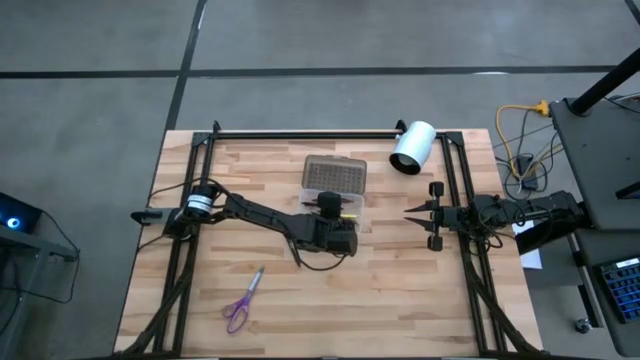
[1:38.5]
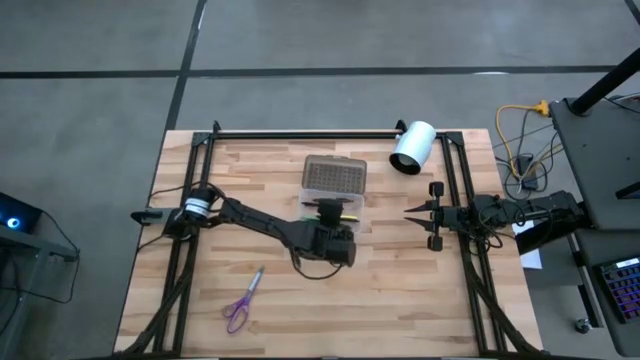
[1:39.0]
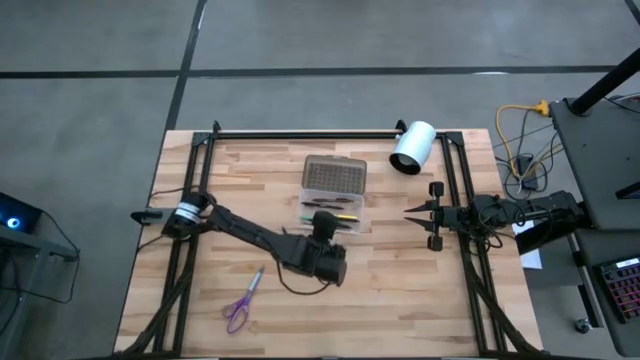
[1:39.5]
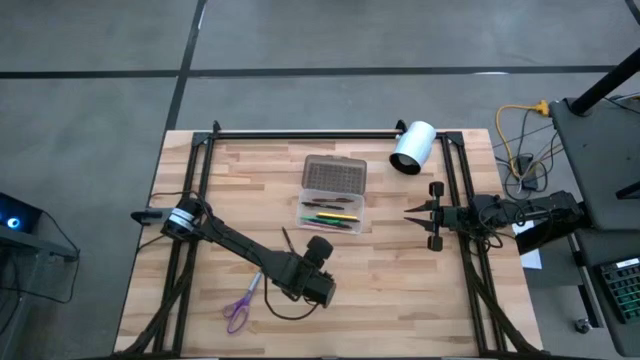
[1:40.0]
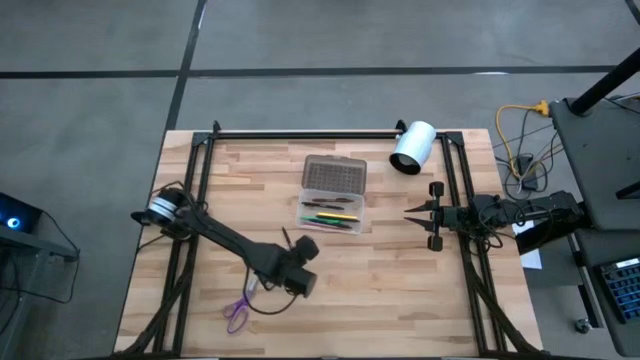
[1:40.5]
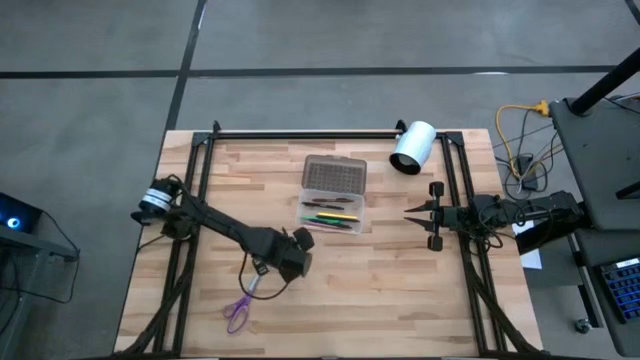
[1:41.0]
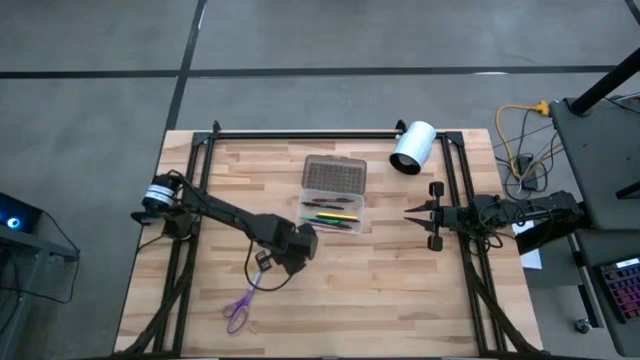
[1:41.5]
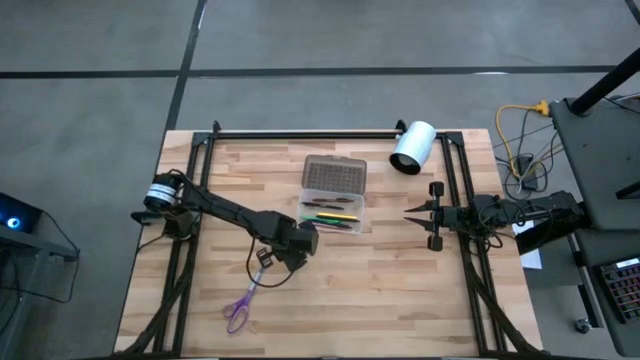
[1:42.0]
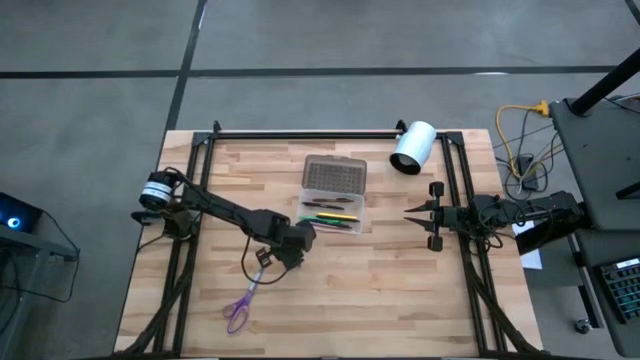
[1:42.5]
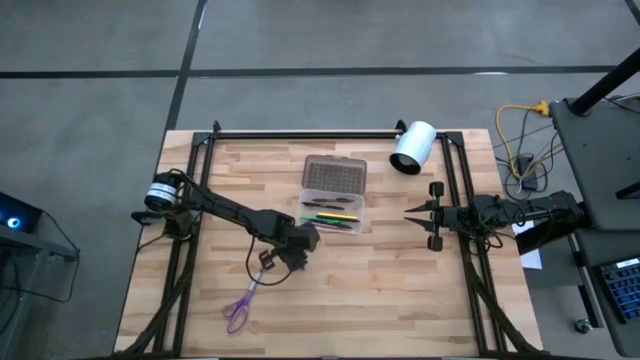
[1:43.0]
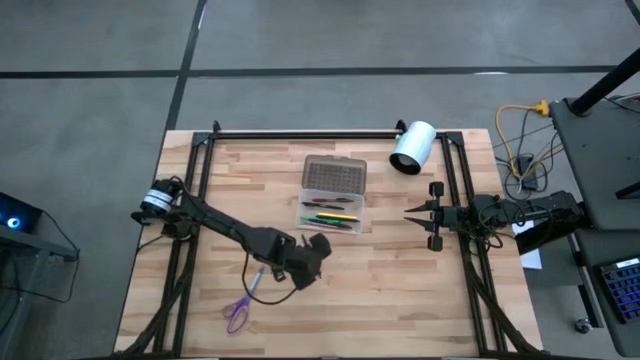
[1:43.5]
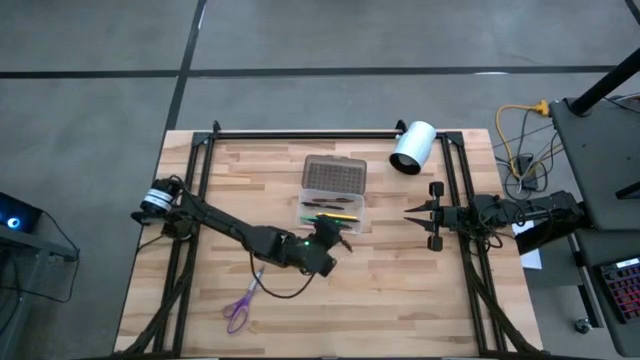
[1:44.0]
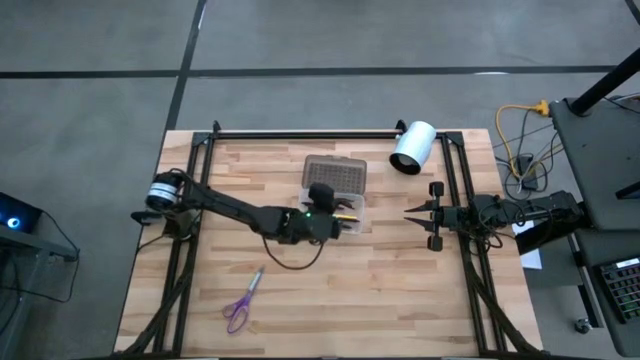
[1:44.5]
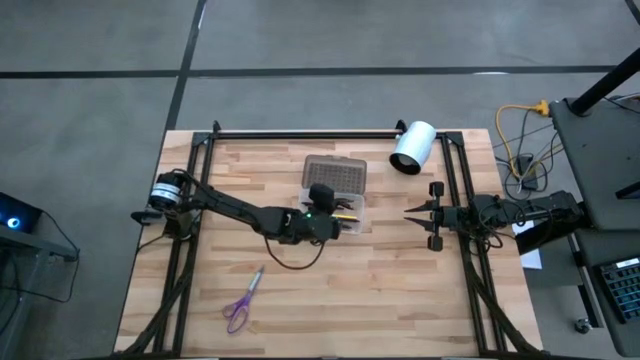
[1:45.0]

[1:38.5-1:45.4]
Task: Pick & place school supplies into a supply box
Put the black pen into the black supply box

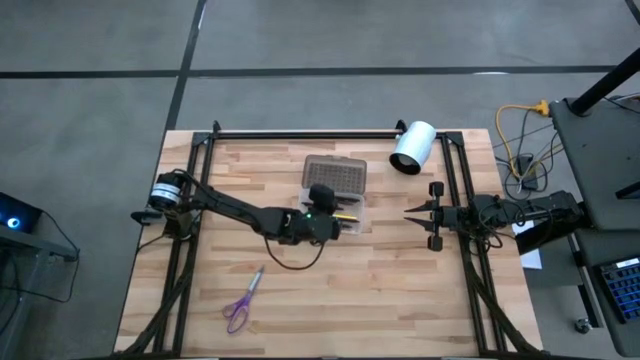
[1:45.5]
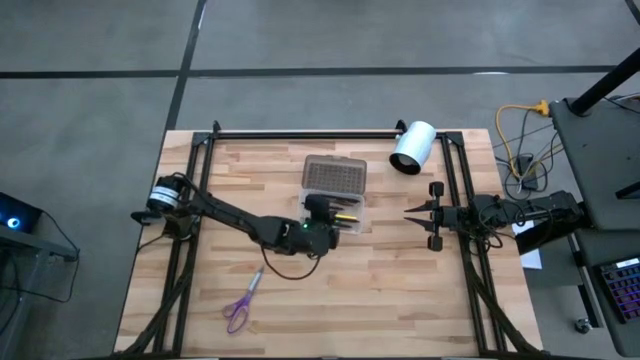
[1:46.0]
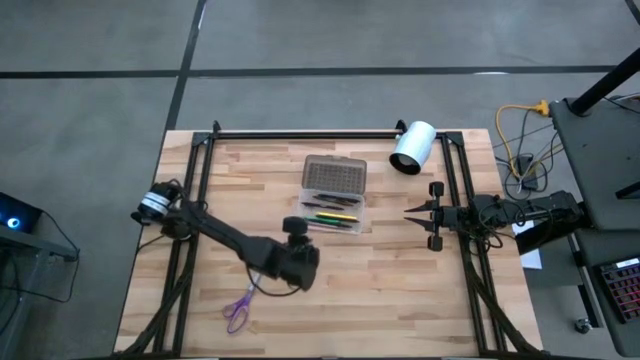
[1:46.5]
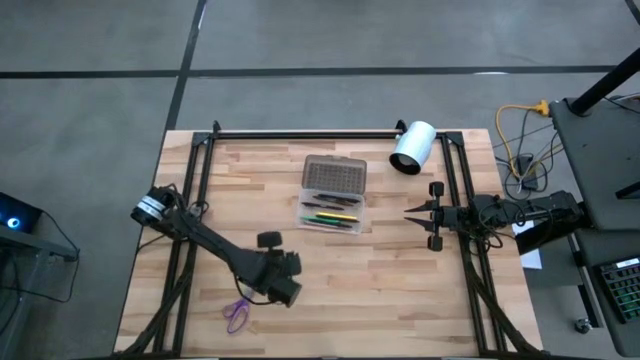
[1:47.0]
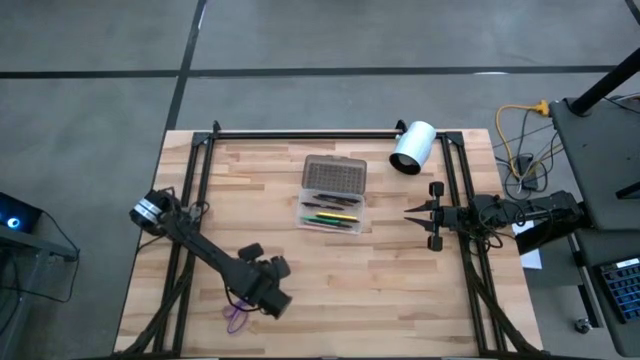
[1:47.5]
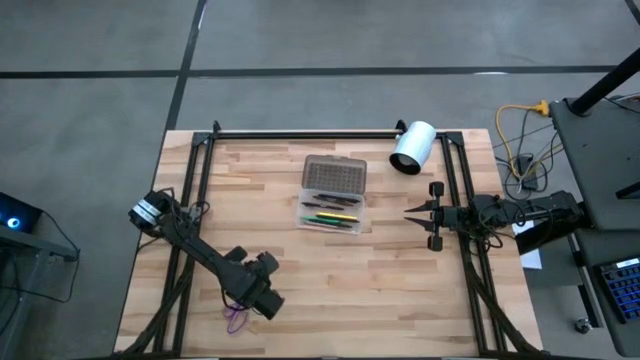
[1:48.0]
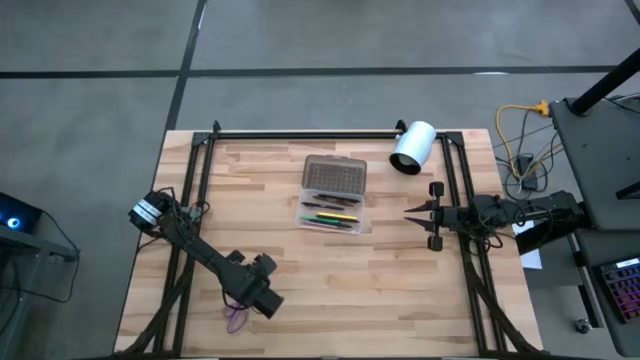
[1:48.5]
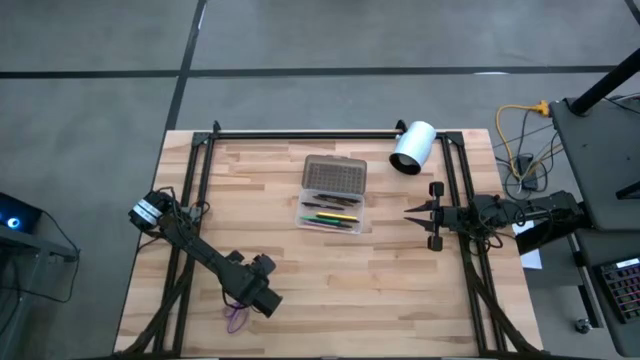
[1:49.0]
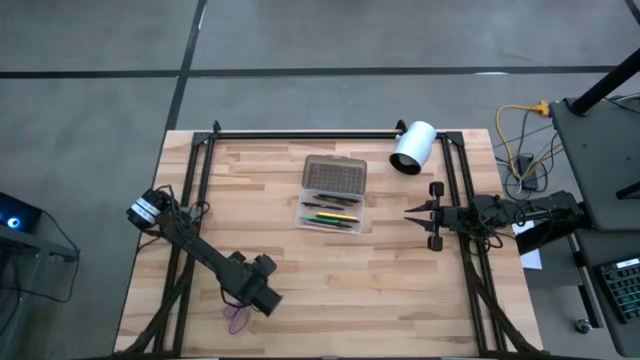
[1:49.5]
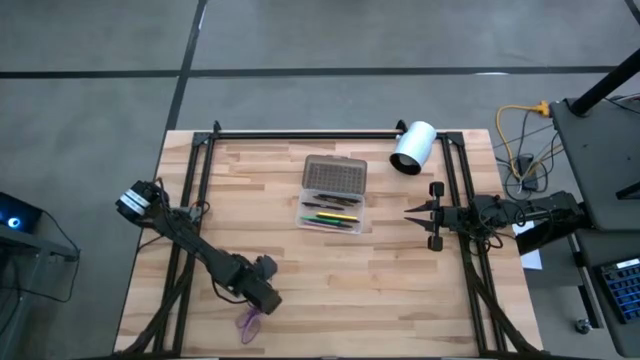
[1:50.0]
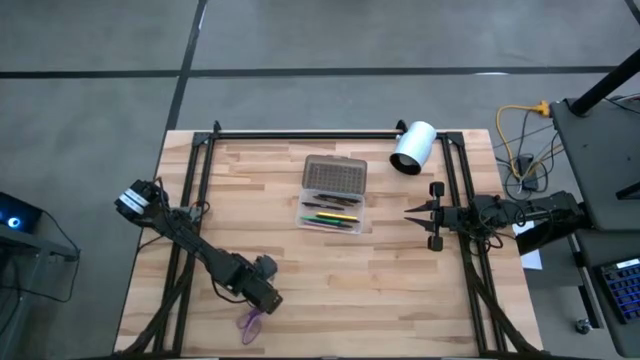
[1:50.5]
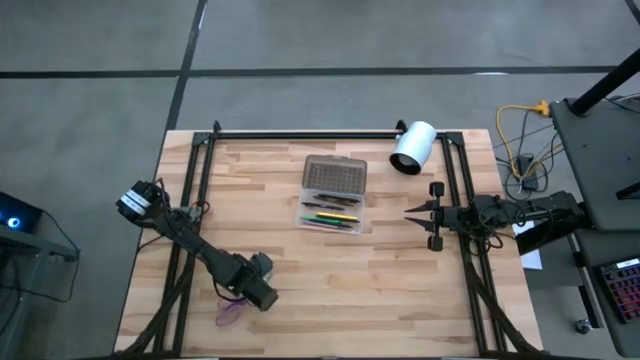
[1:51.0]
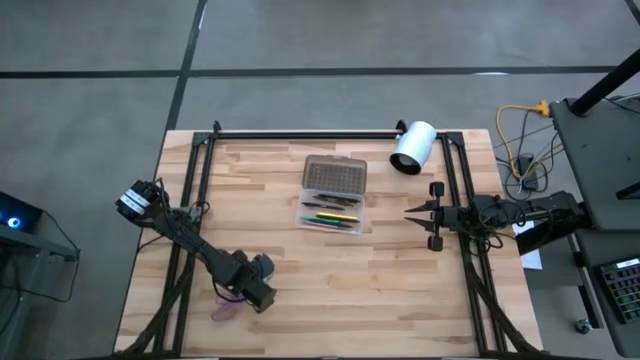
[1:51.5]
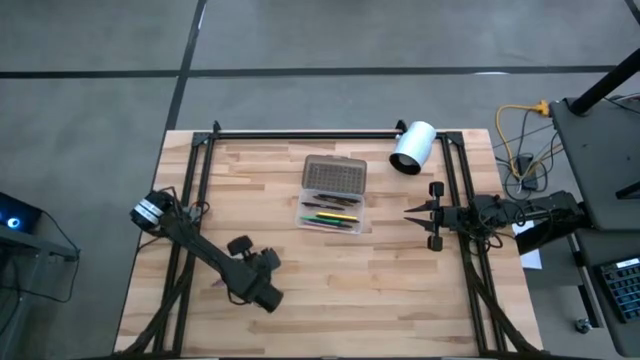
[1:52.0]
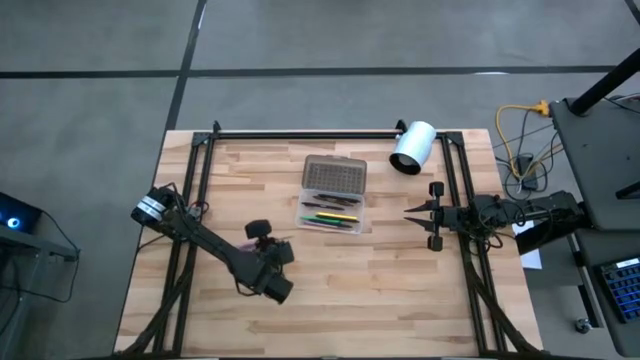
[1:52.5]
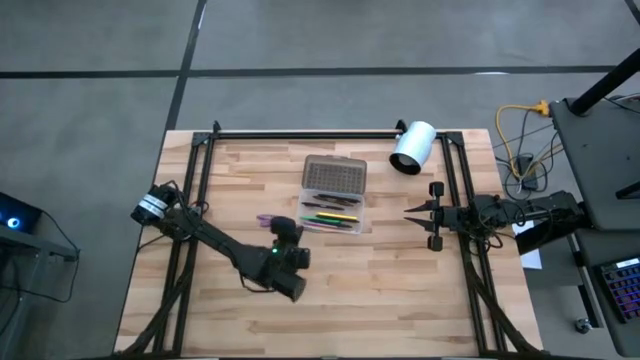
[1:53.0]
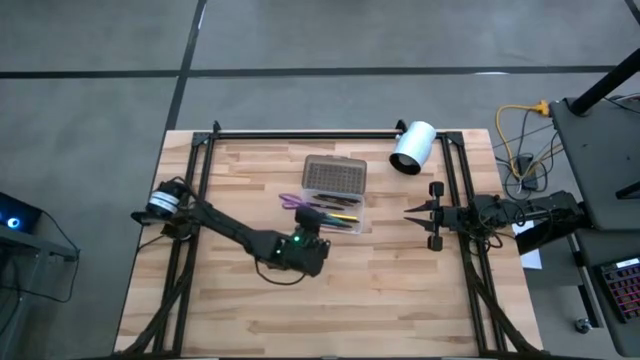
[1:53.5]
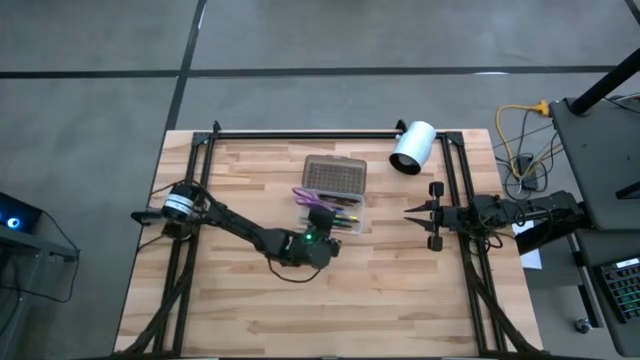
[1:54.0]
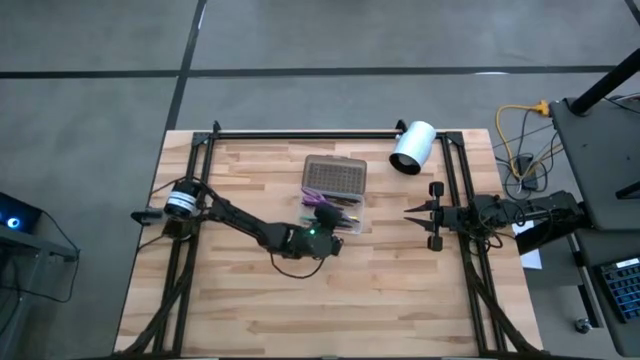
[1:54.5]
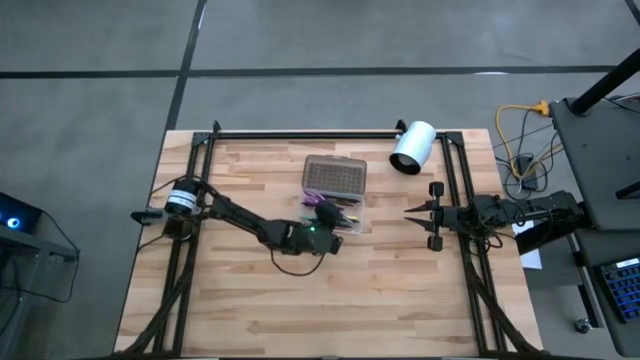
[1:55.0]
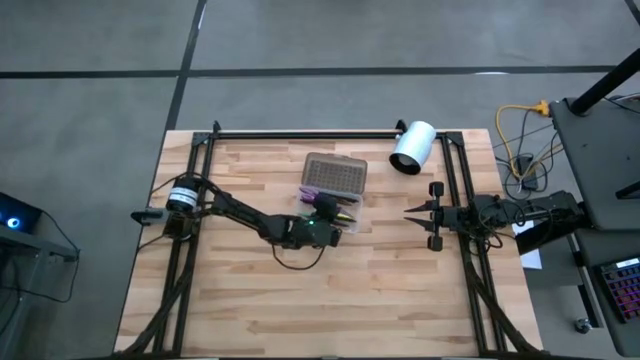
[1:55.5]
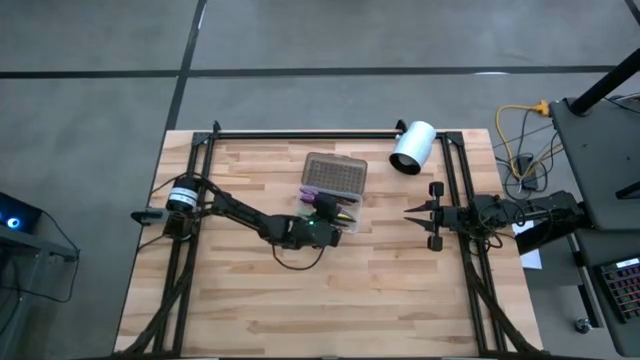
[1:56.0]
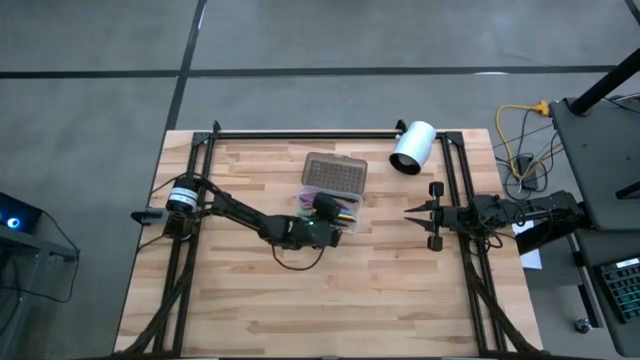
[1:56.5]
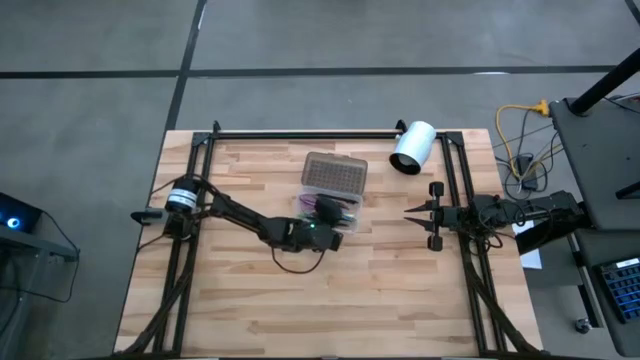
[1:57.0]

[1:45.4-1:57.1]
Put the purple scissors into the black supply box

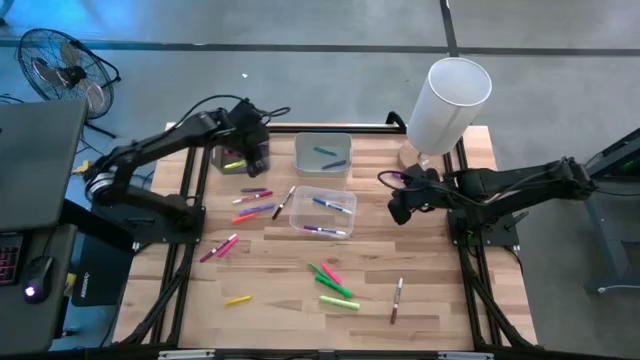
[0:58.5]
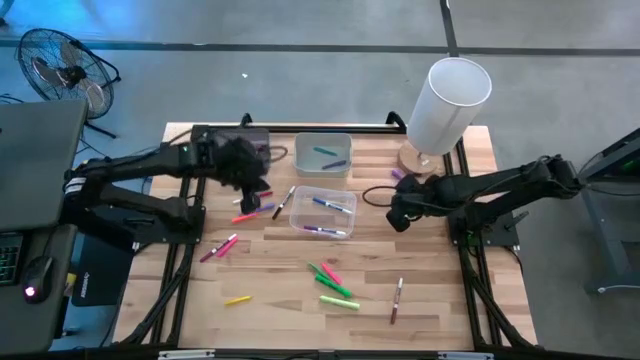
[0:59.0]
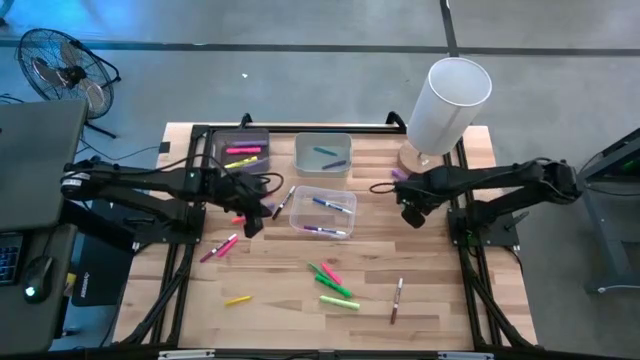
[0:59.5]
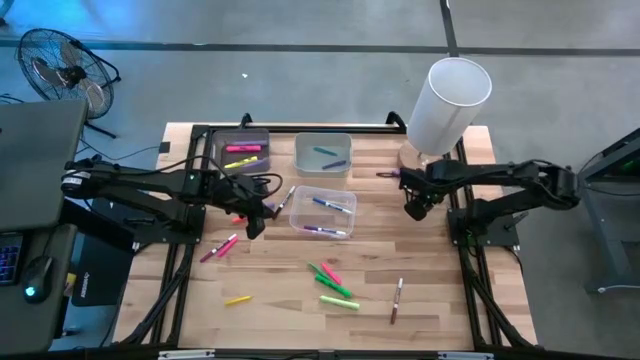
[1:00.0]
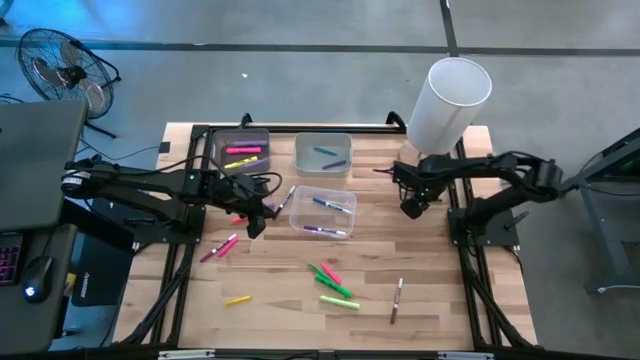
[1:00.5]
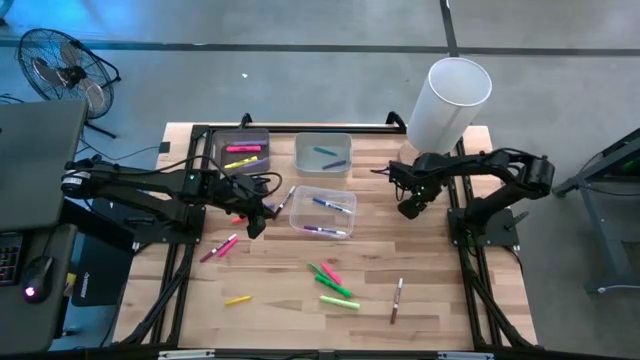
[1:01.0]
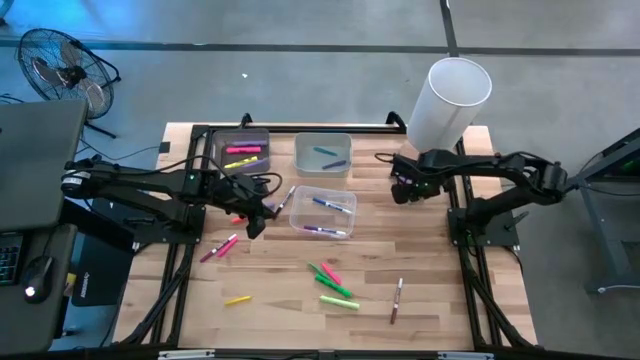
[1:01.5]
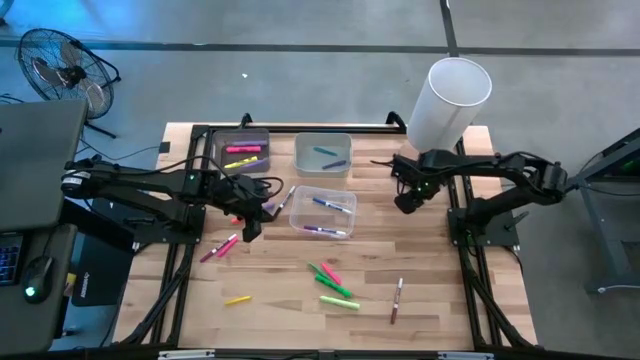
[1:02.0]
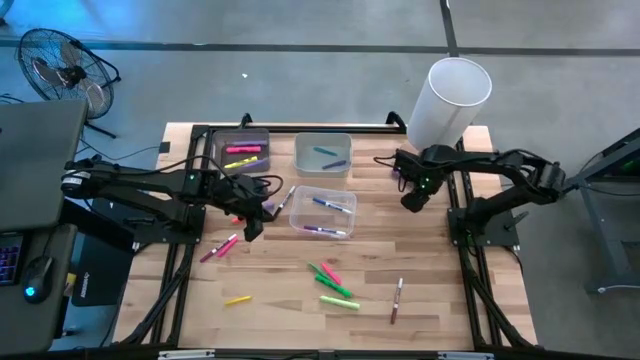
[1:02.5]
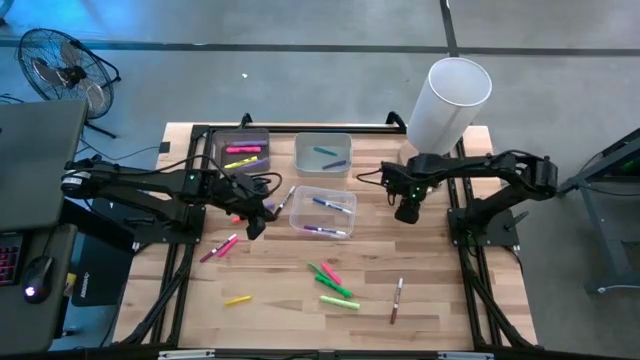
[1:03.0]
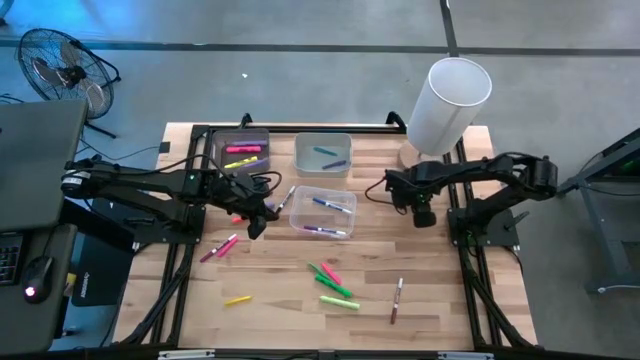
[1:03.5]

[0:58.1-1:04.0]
Task: Pick & Place Markers
Put the green marker into the white bin
